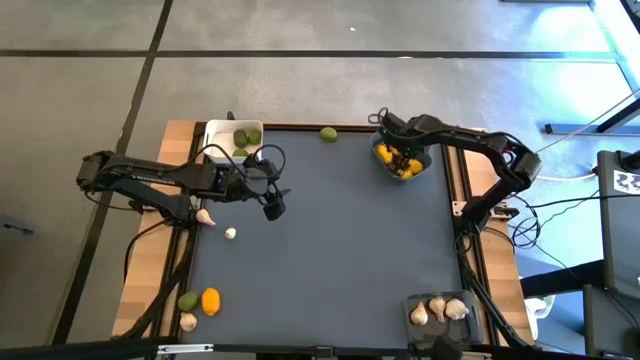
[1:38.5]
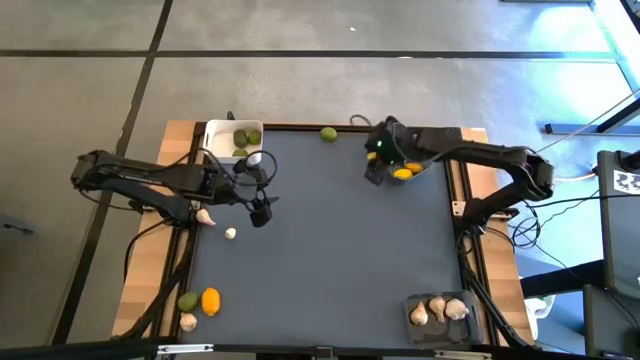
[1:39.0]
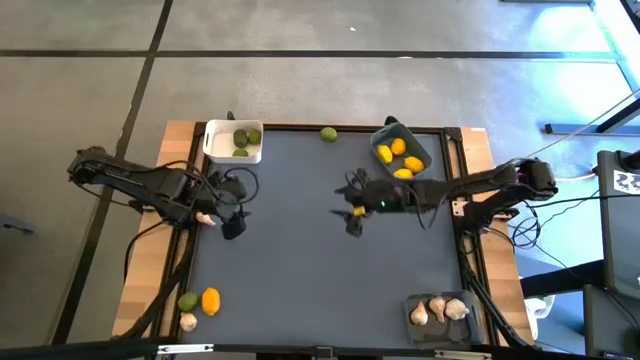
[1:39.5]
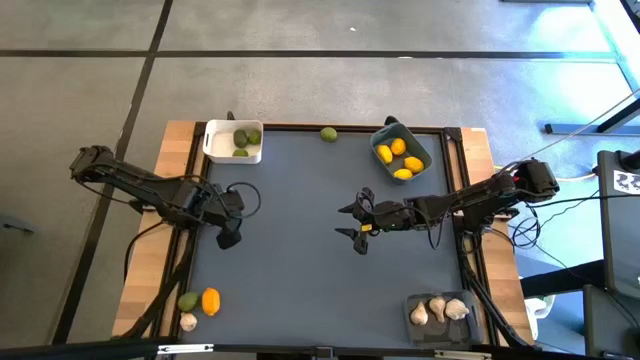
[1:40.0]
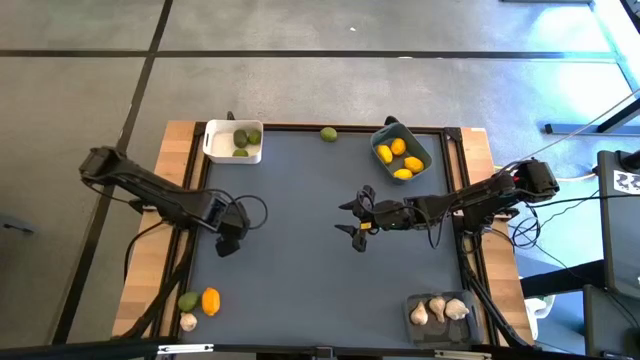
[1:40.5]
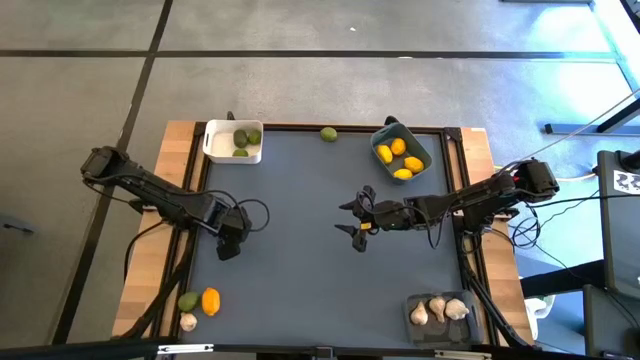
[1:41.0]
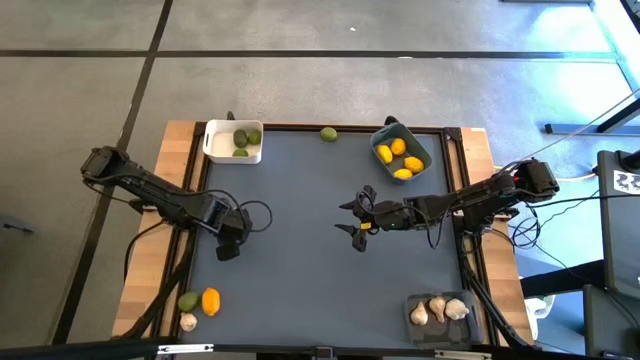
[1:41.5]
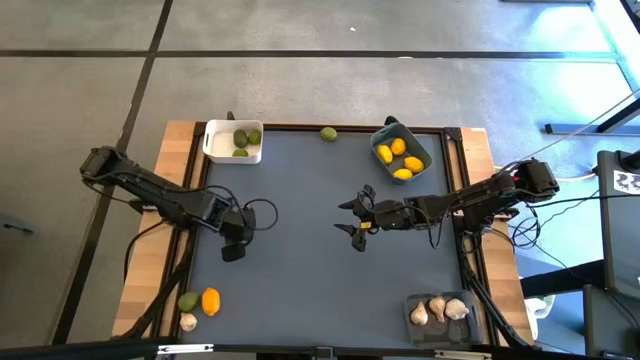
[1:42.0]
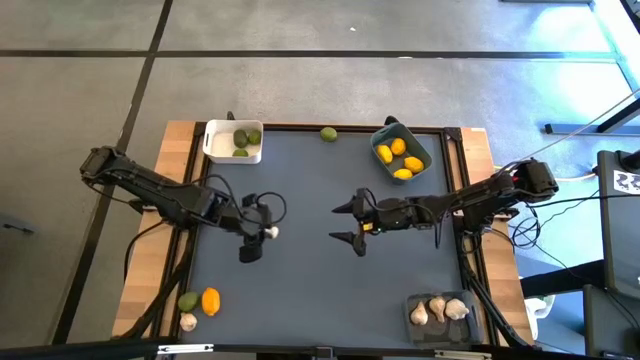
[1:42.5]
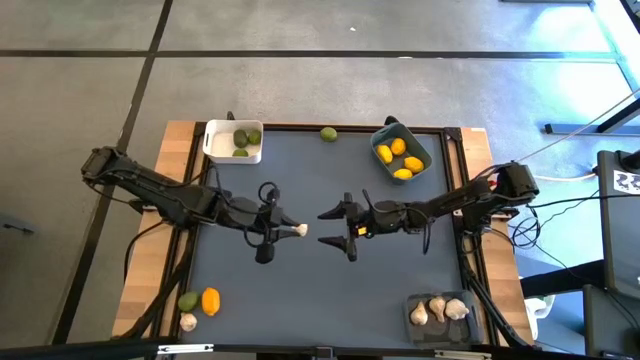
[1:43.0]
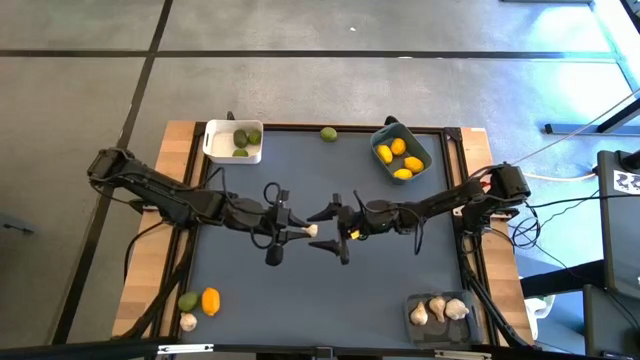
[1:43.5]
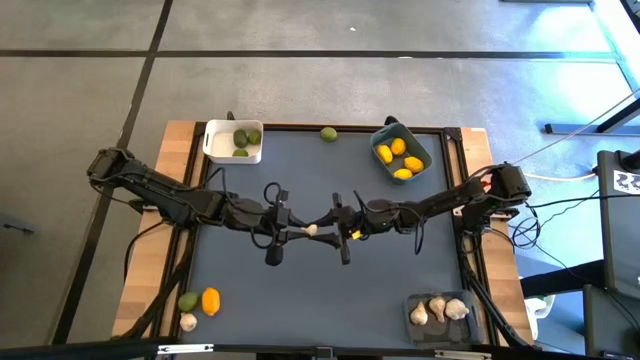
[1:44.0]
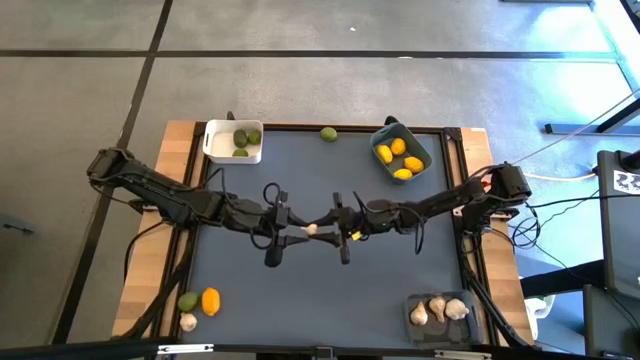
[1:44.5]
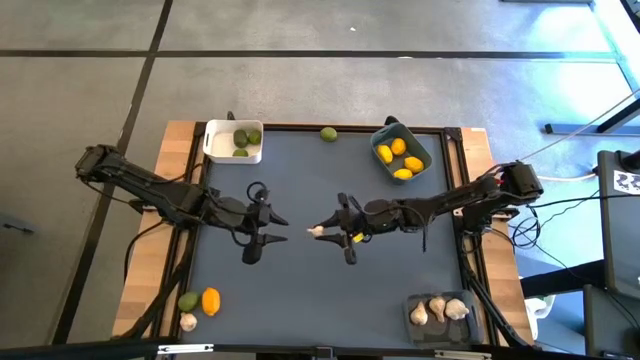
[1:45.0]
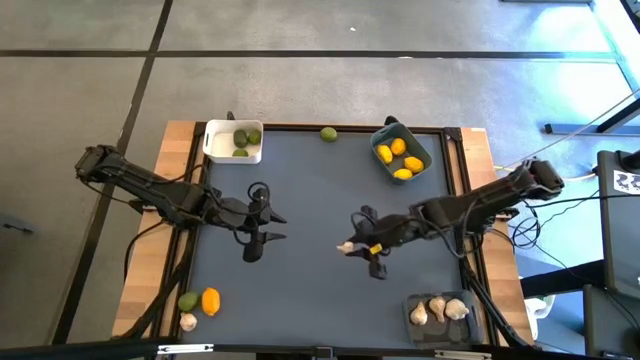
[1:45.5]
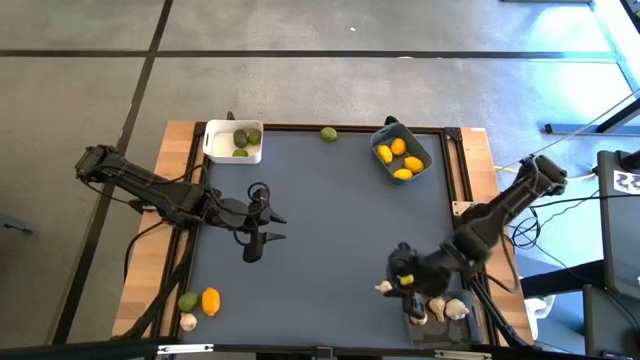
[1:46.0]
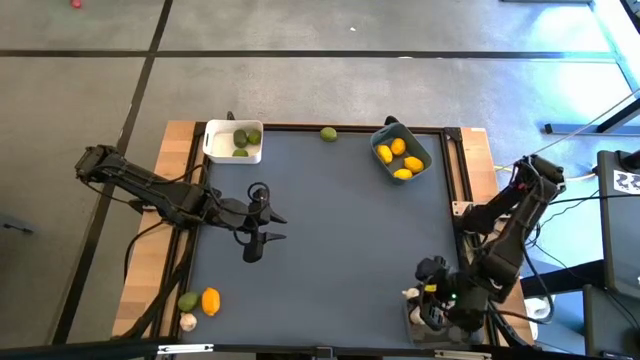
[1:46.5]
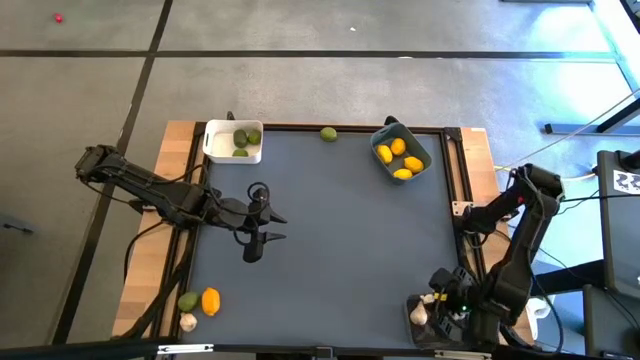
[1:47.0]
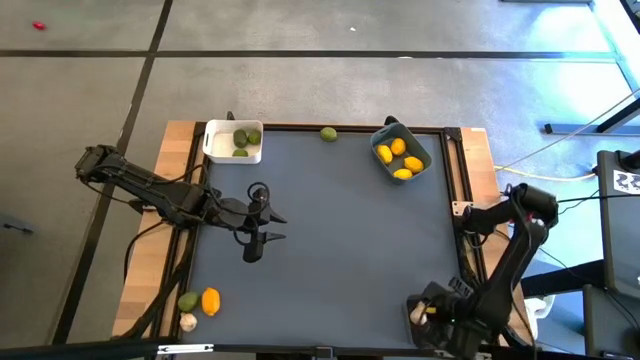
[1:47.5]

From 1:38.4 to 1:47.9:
Task: Sort produce into baskets
Put the white garlic into the black bin

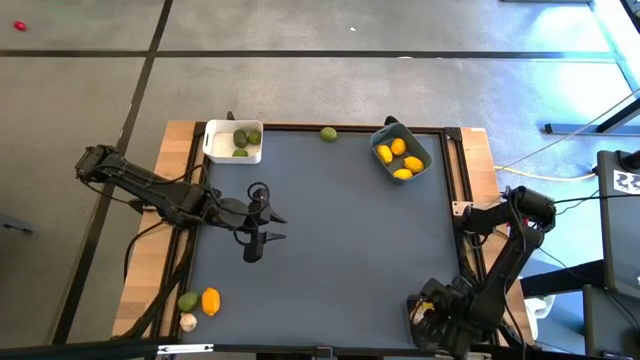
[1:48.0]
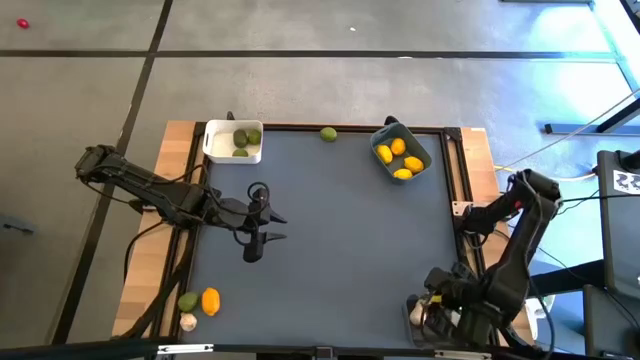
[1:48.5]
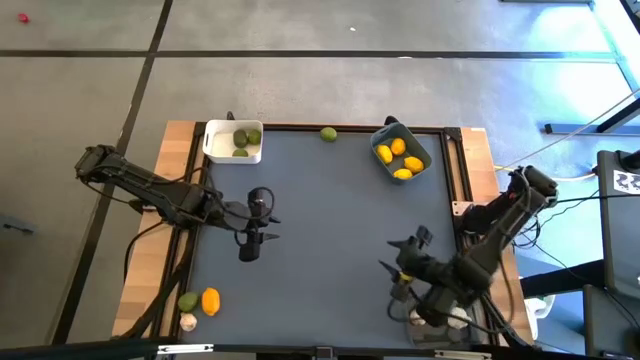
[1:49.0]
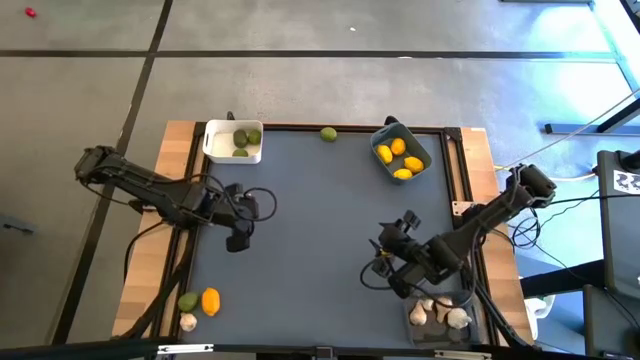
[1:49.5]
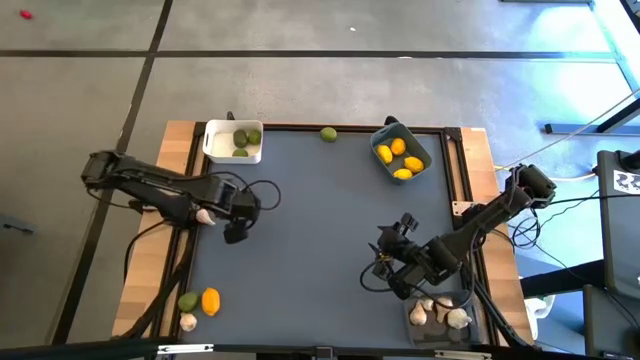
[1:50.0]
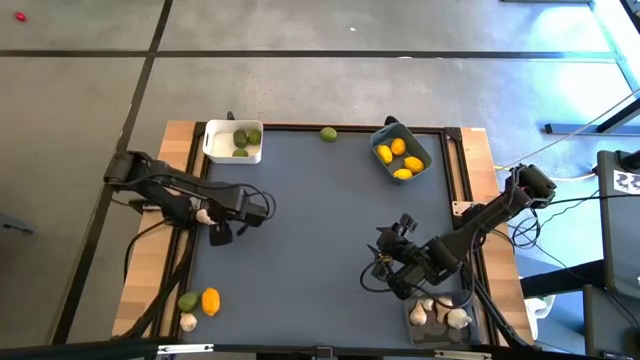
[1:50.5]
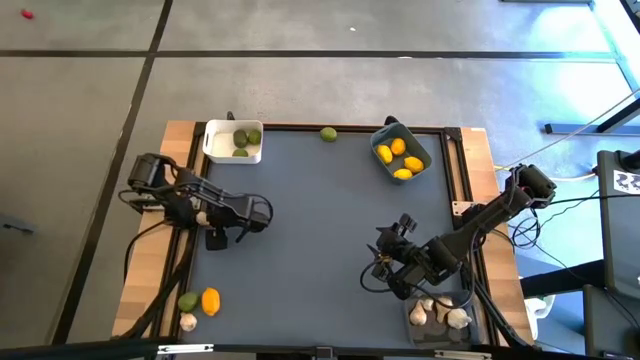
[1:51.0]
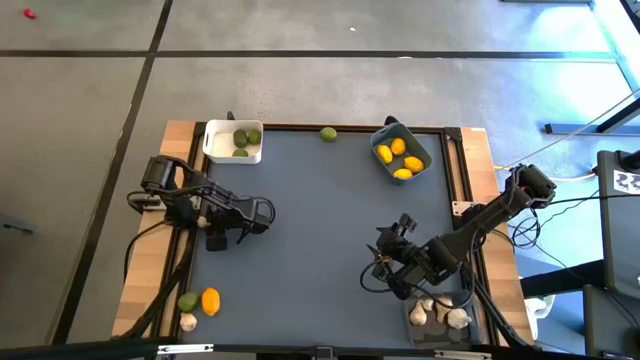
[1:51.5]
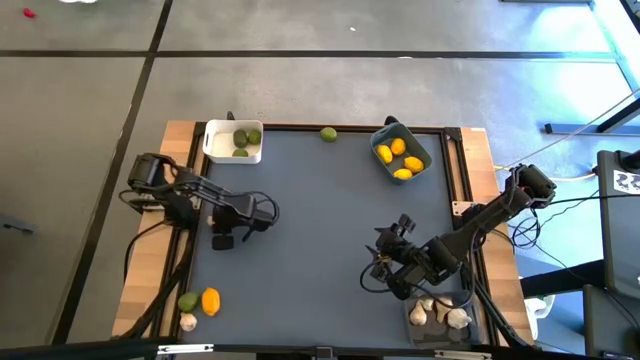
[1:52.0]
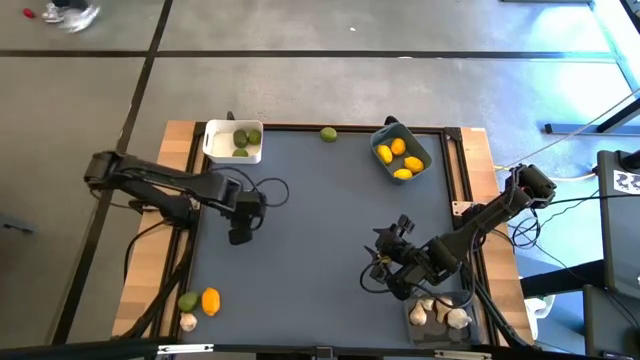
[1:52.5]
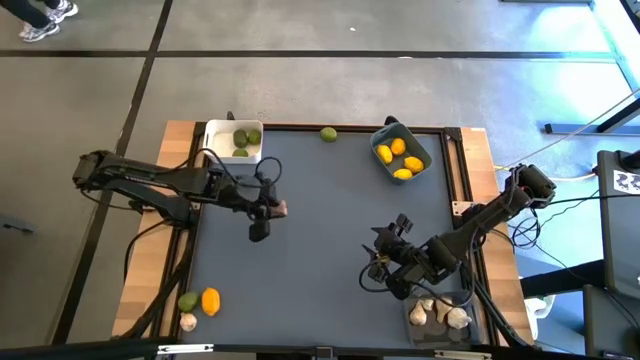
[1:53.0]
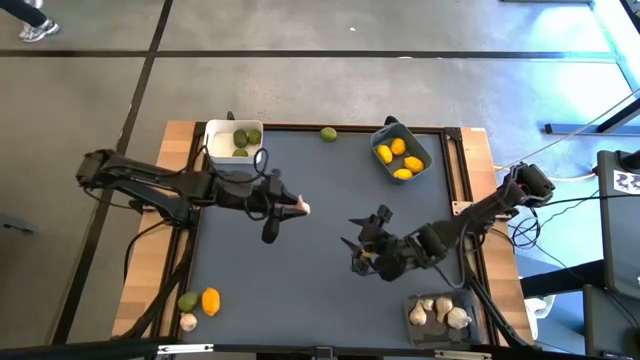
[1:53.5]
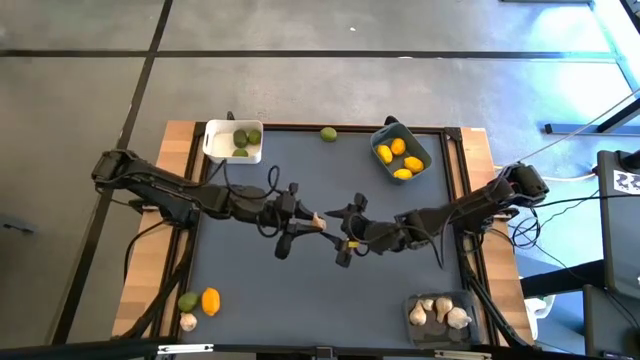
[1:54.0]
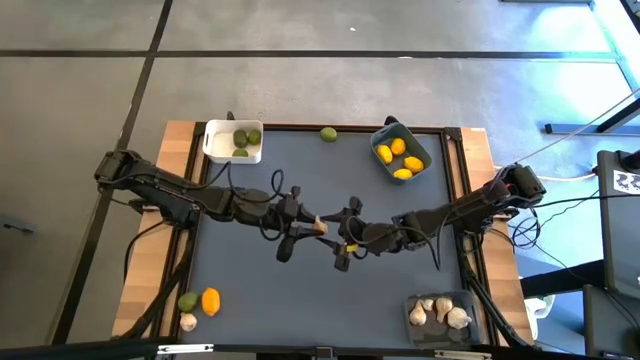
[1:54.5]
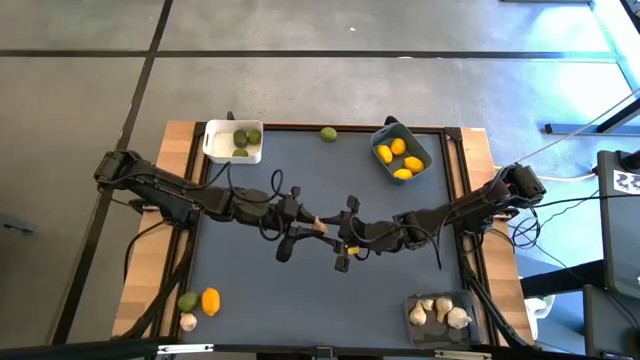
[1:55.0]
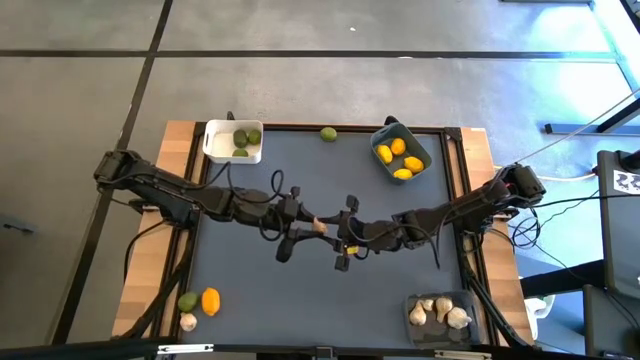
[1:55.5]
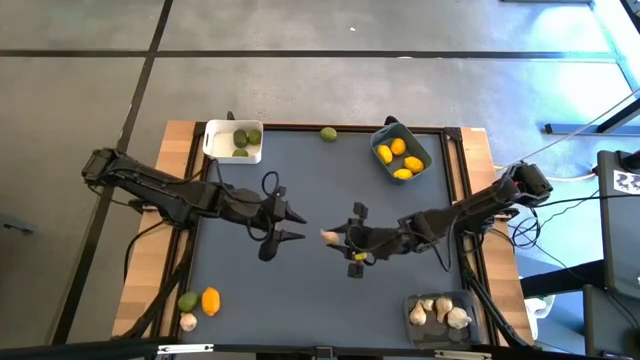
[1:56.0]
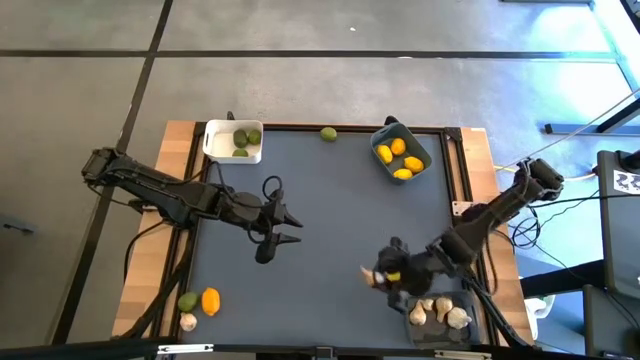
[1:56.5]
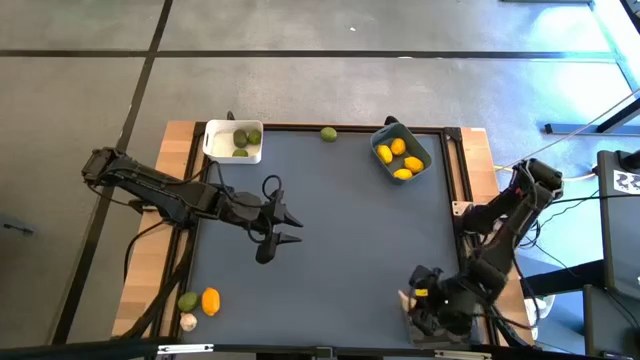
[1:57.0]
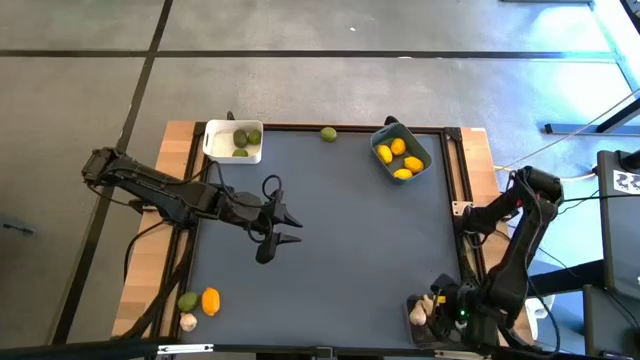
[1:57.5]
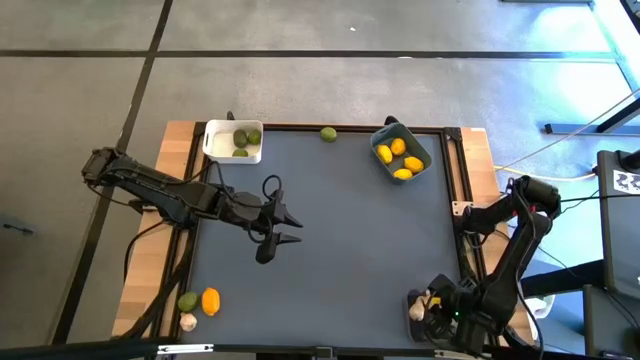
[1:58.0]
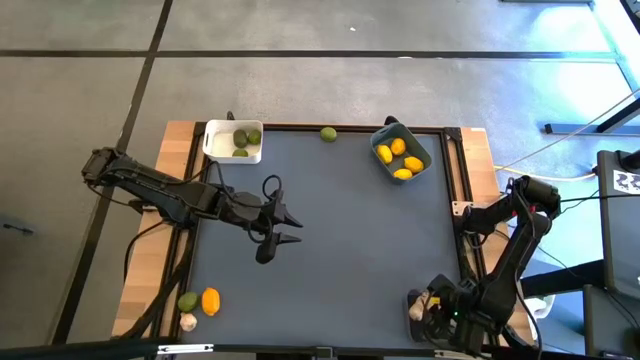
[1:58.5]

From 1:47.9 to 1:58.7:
Put the white garlic into the black bin

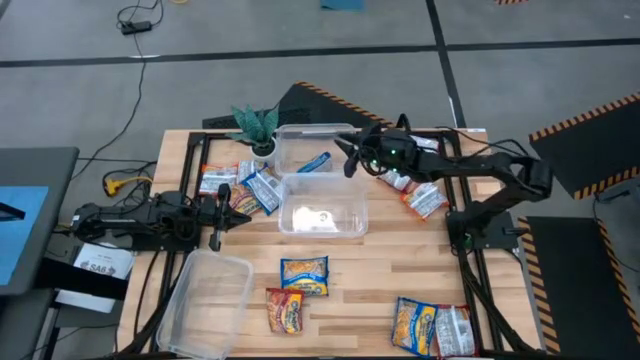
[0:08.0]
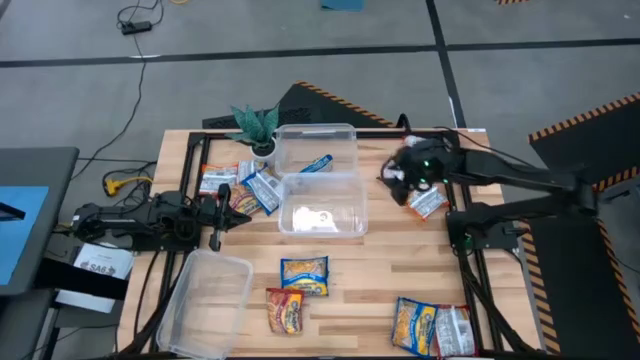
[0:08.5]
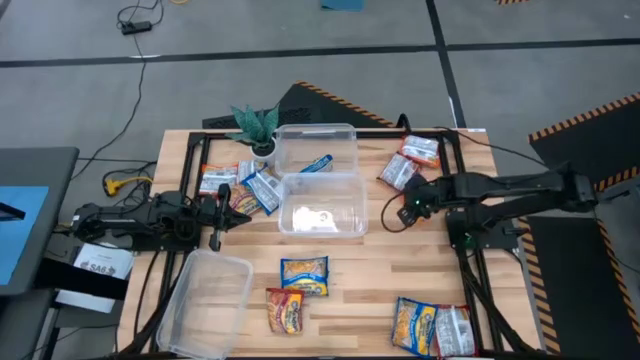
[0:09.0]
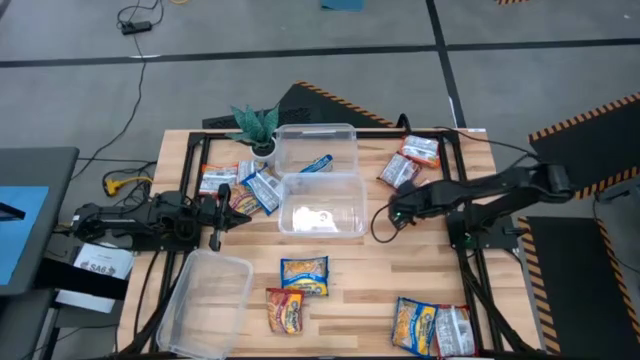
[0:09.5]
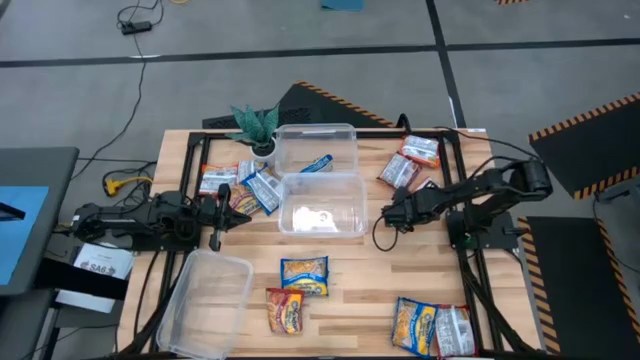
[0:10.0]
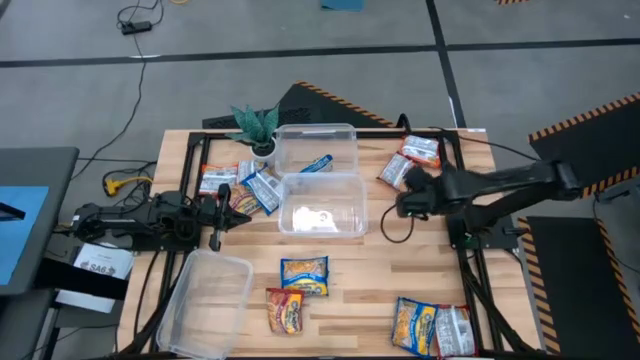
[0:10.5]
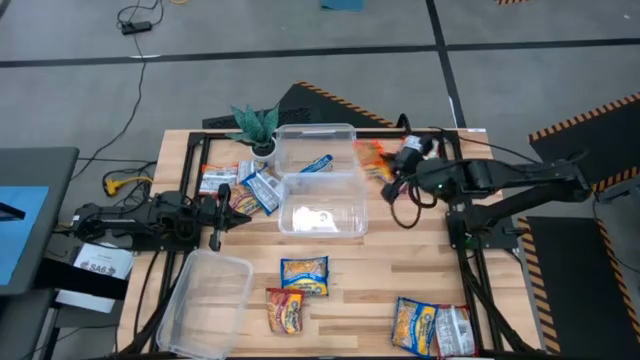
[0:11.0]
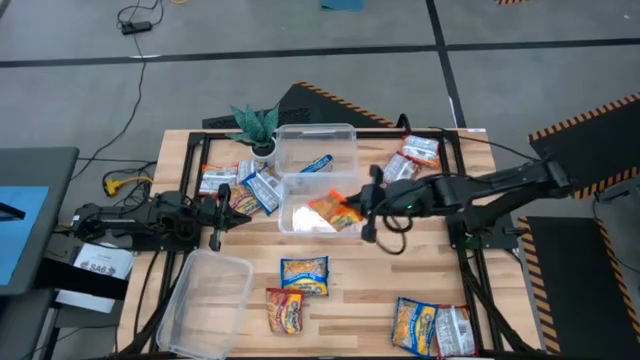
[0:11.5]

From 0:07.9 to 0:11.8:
Task: Sort Maruchan noodles
Put the orange noodle pack into the middle transparent bin
